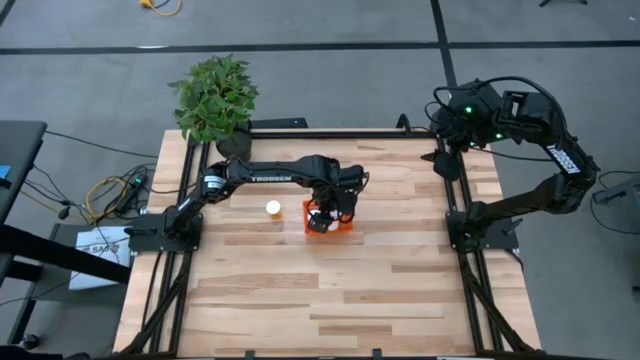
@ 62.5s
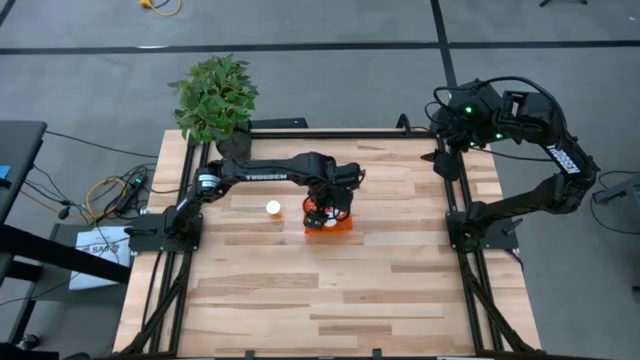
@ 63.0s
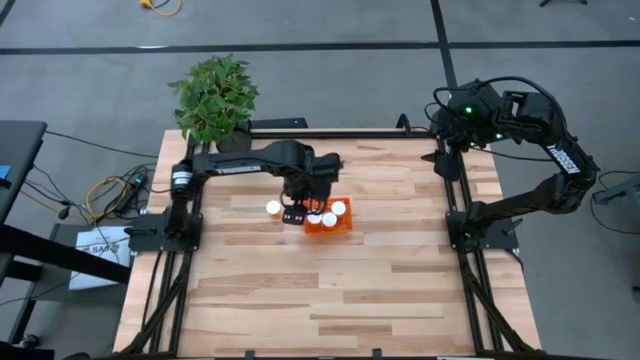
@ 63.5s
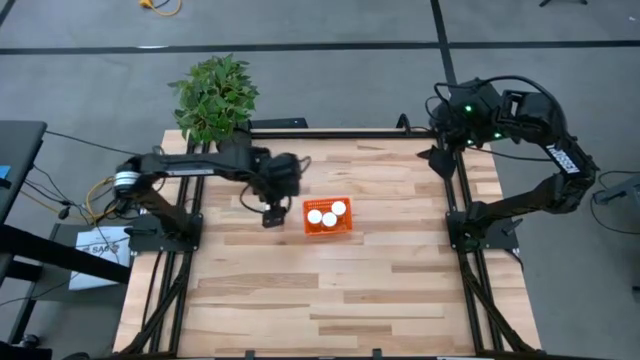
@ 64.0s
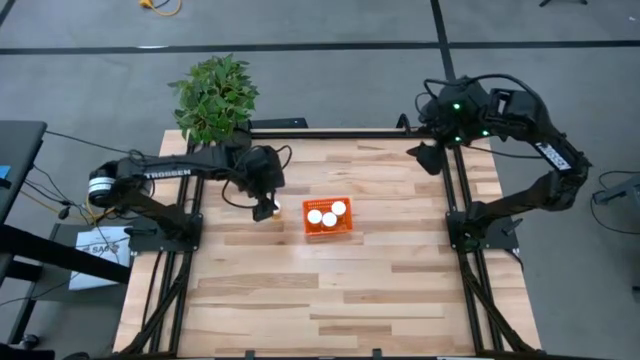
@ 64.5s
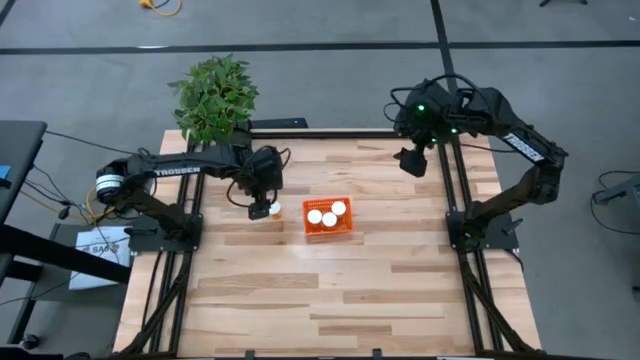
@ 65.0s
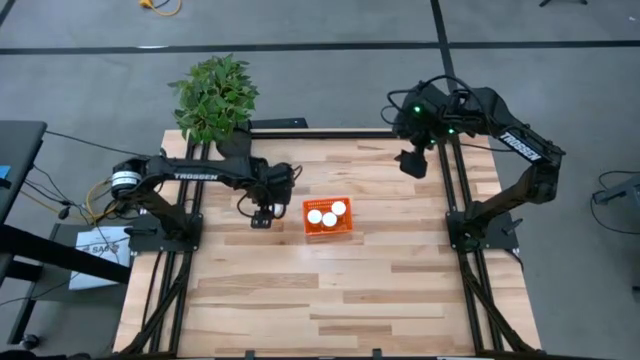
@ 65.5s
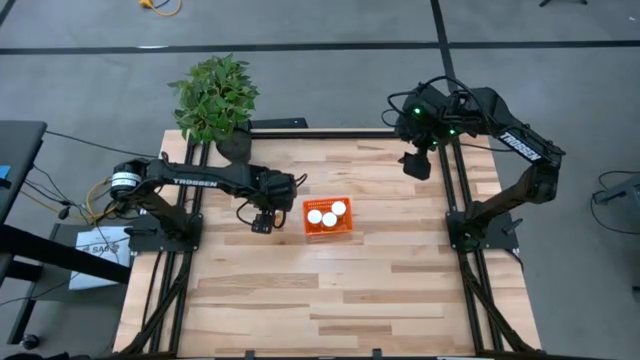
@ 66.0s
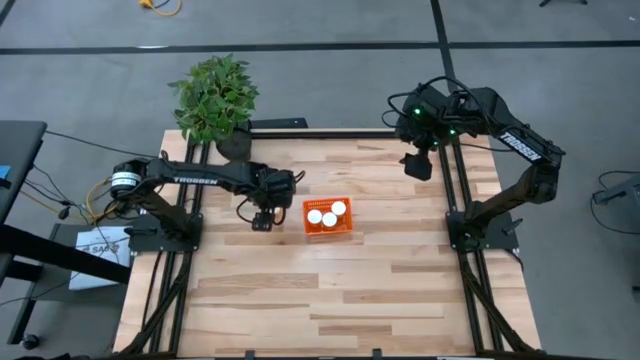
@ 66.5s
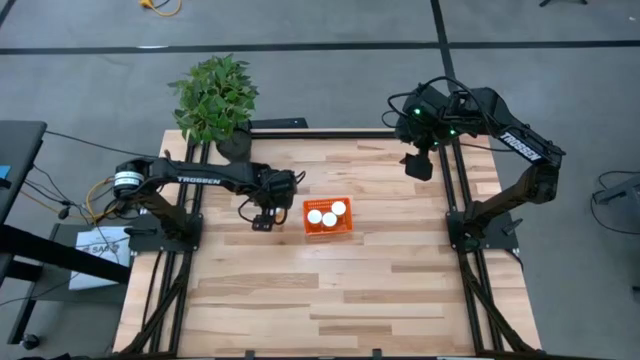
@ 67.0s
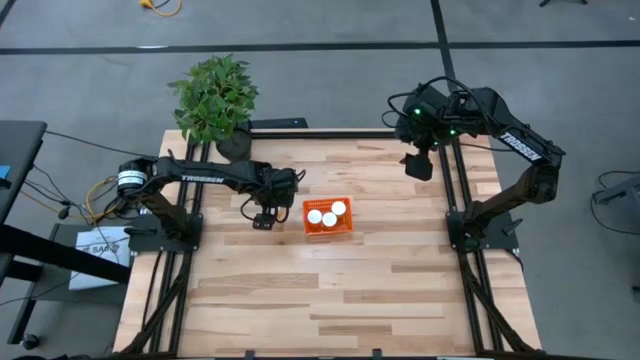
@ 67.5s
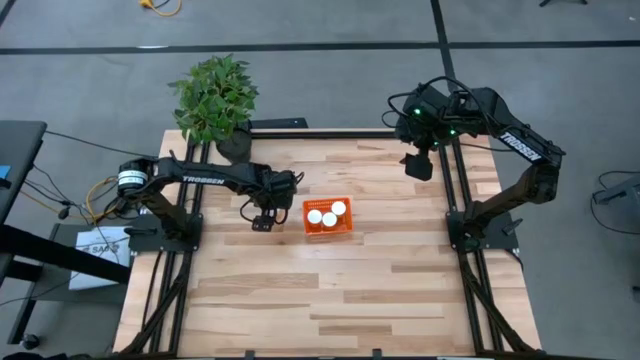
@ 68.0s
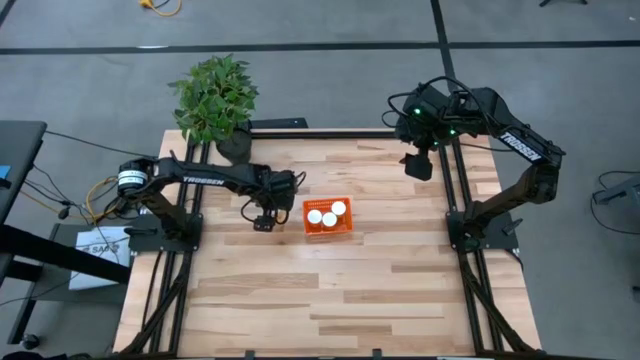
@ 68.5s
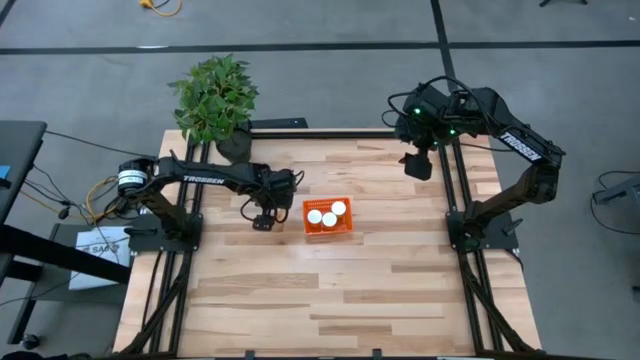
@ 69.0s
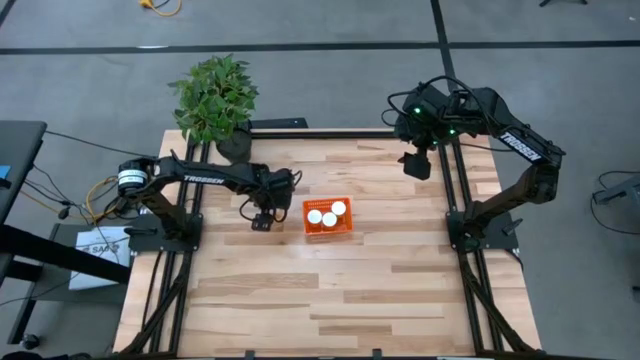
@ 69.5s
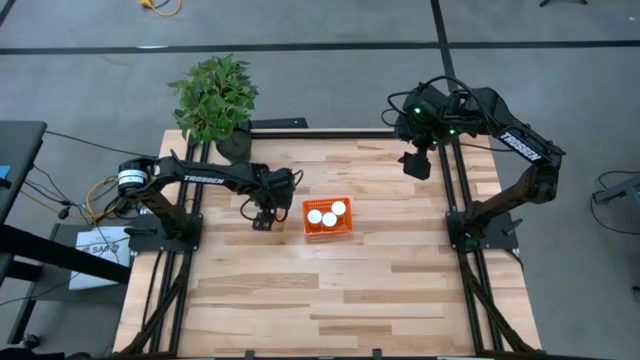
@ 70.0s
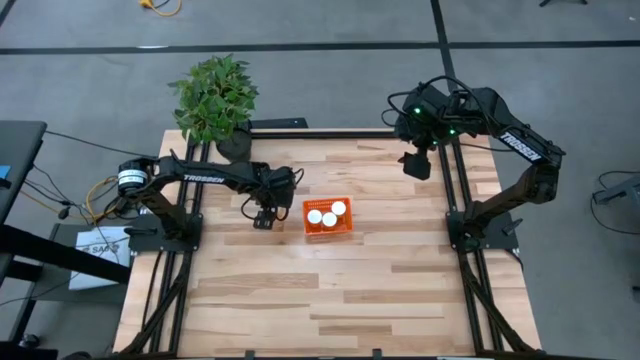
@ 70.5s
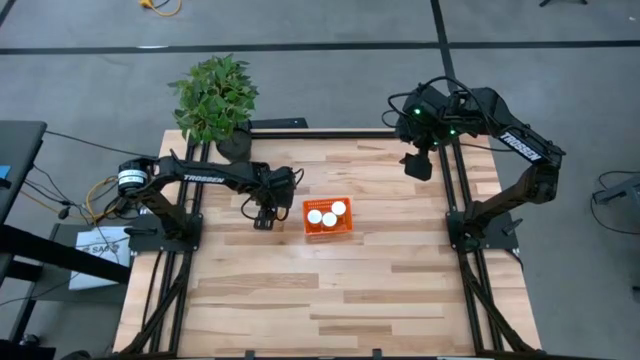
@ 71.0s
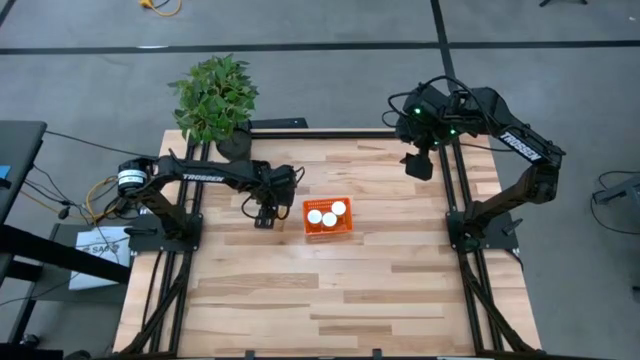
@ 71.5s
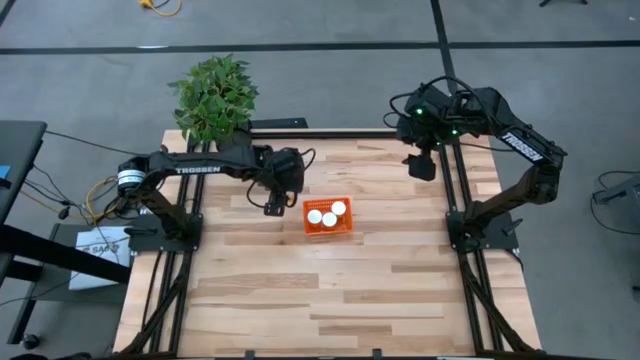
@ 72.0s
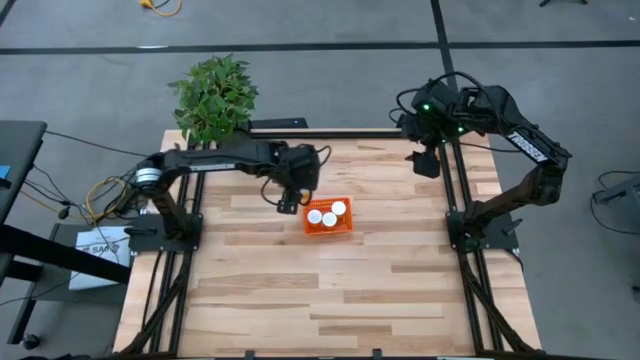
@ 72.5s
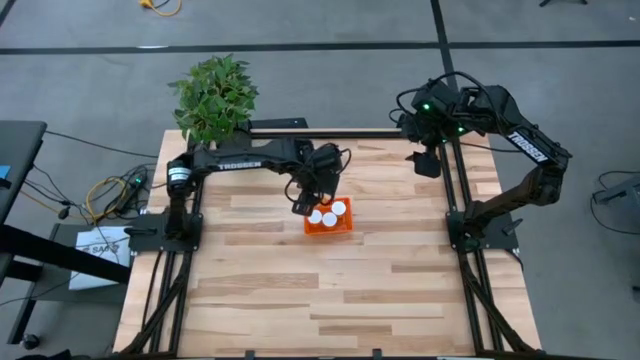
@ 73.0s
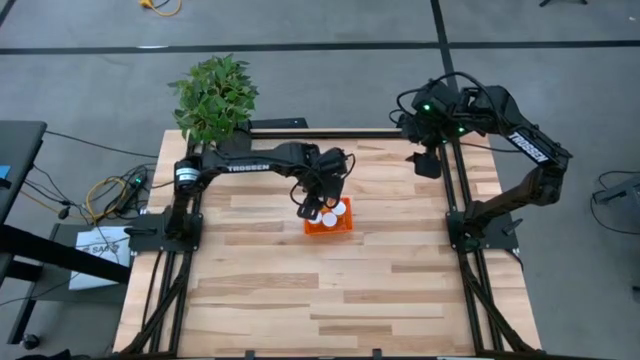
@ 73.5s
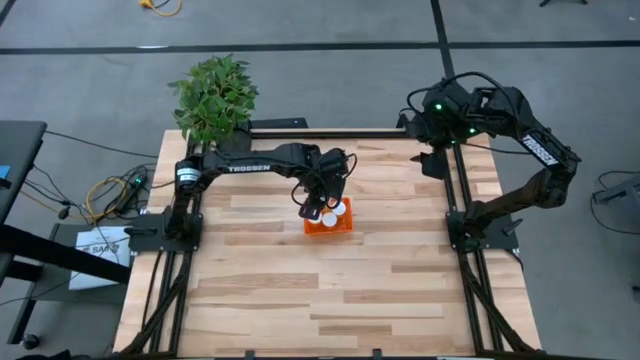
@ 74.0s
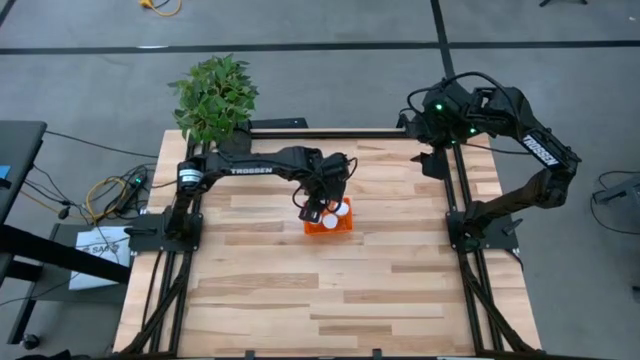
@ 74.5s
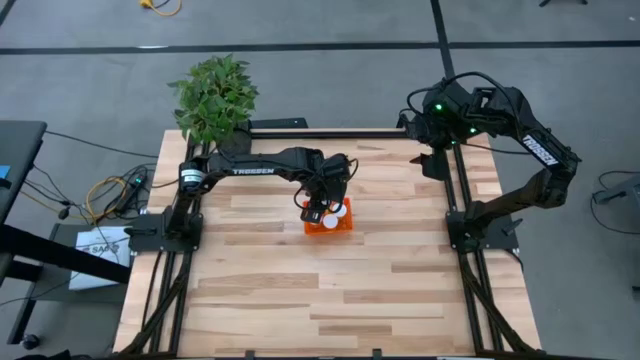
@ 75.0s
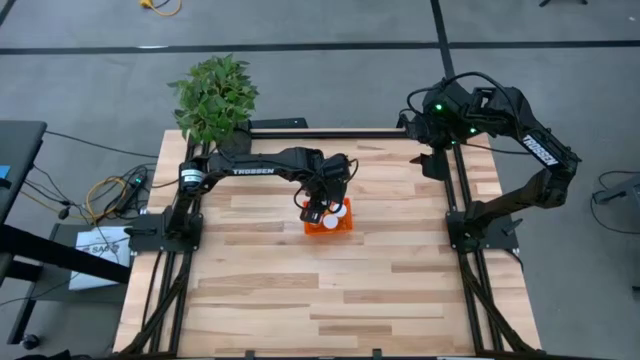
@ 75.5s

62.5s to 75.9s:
Task: Pick and place pill bottles into a basket
Put the orange pill bottle into the orange bin

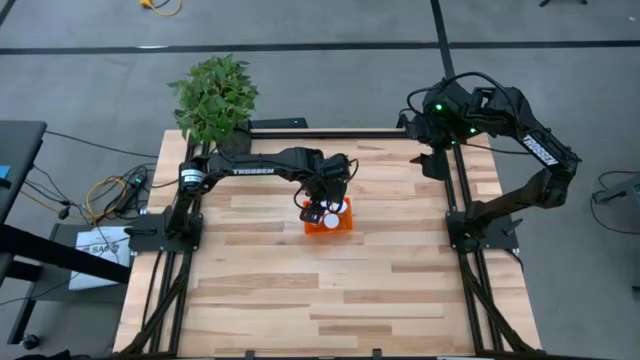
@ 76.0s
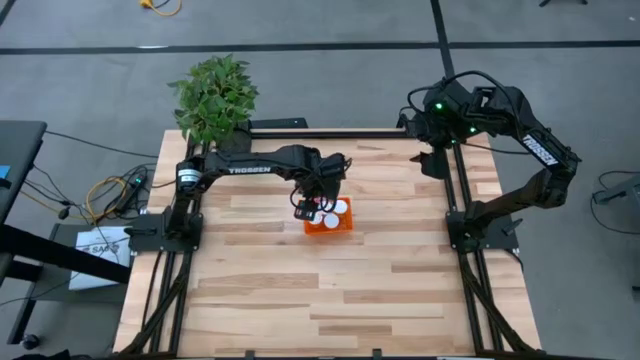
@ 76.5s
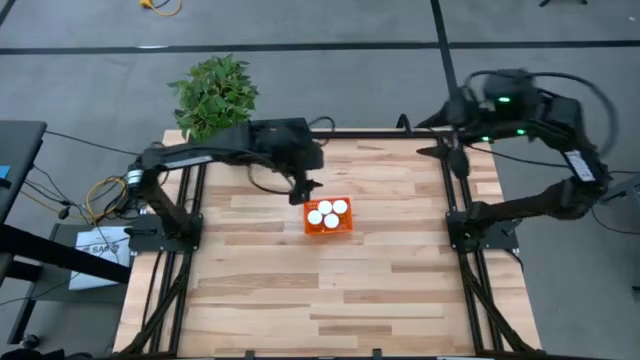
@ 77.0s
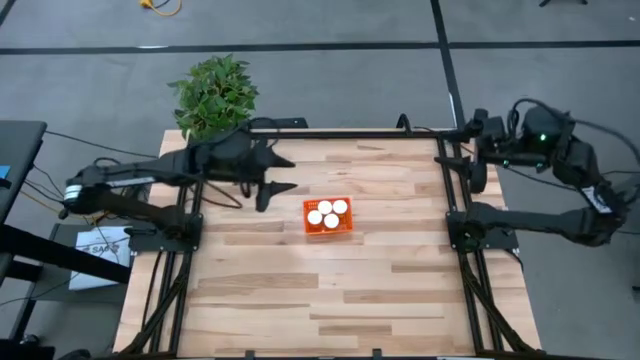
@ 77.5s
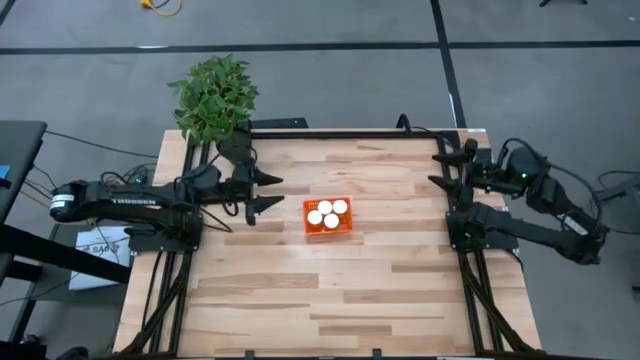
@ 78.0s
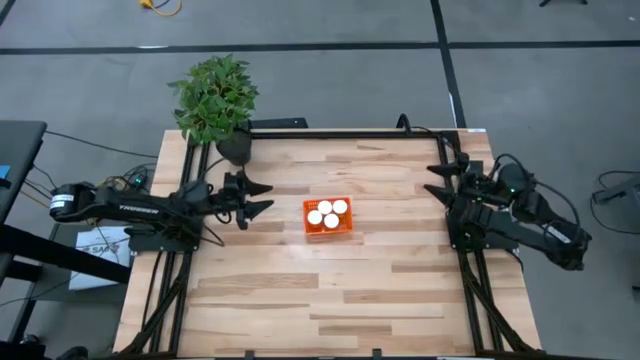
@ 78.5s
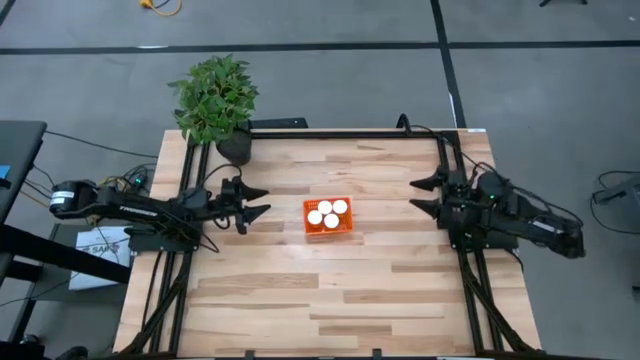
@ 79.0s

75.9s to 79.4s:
Return to Home Position

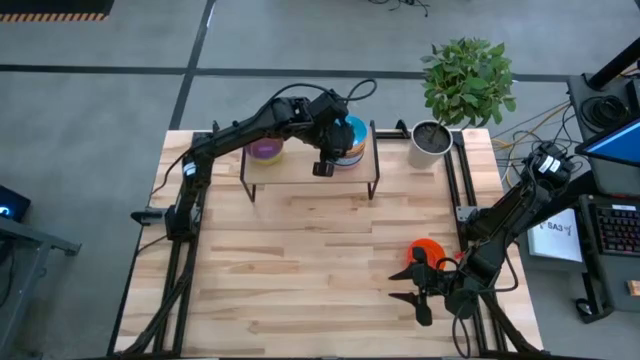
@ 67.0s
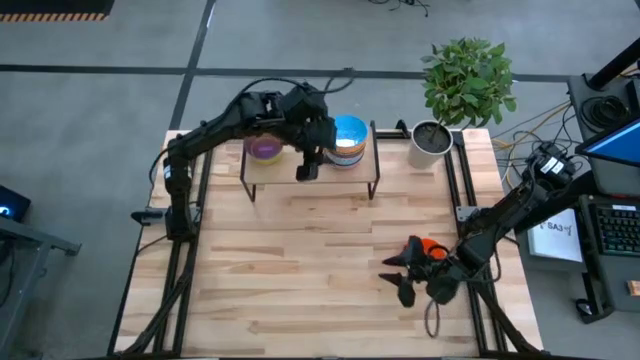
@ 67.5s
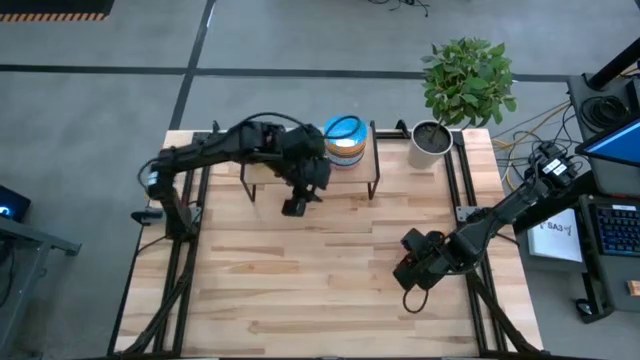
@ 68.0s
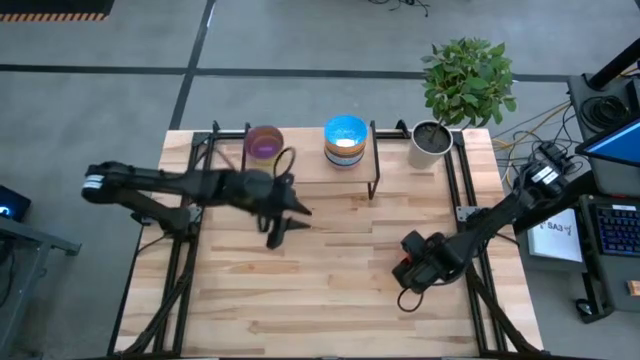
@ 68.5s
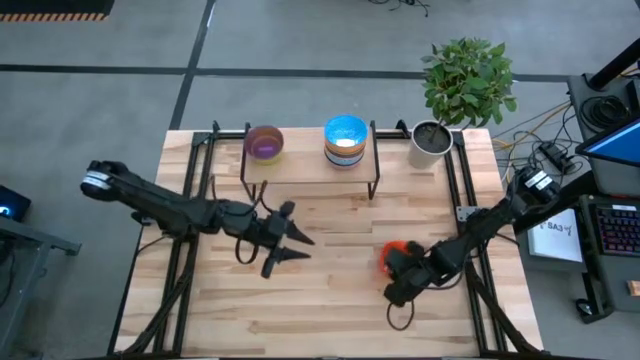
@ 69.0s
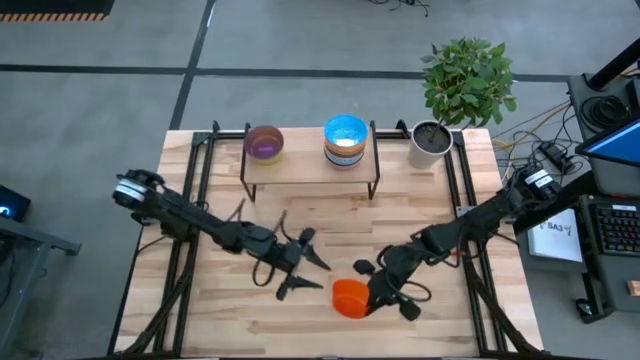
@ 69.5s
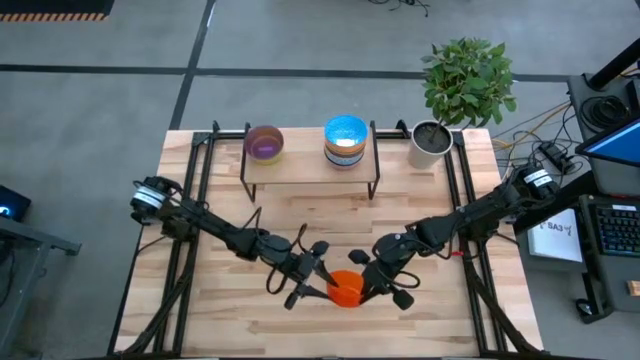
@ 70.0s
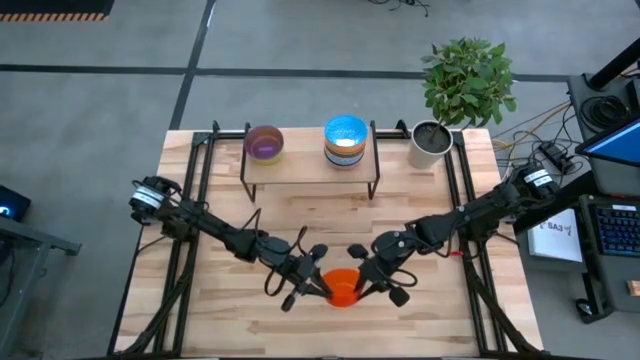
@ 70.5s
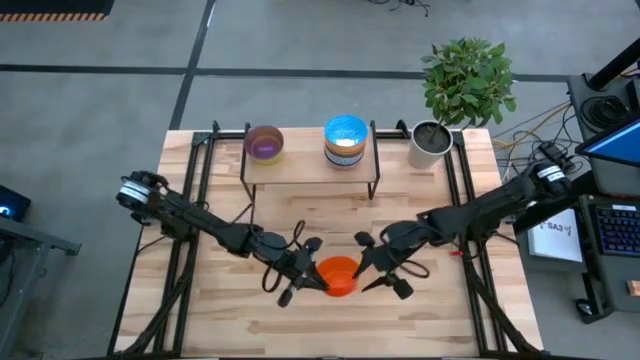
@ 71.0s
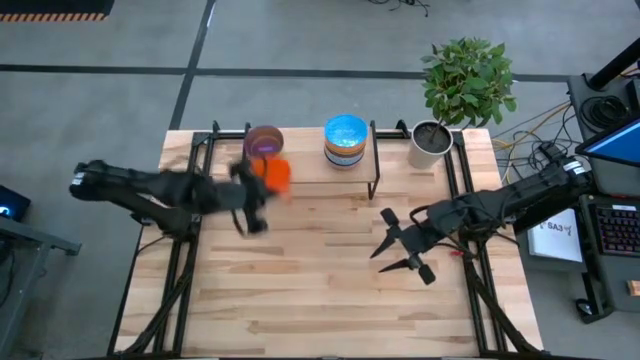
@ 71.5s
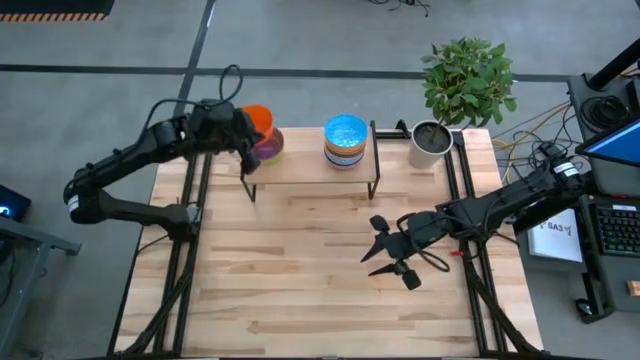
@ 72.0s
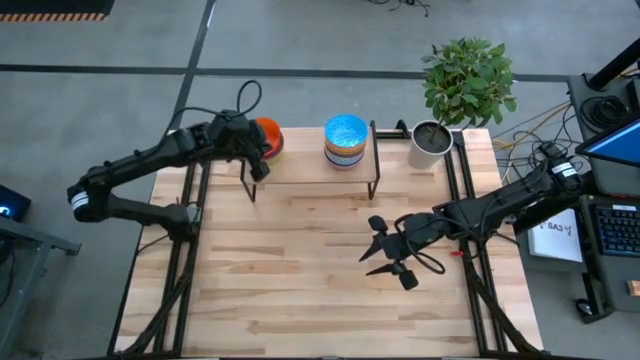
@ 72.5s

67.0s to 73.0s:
Task: Place and stack bowls onto a shelf
Stack the orange bowl on the top of the violet bowl that is on the shelf
